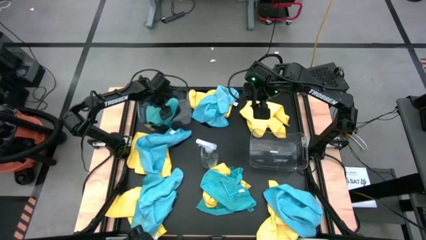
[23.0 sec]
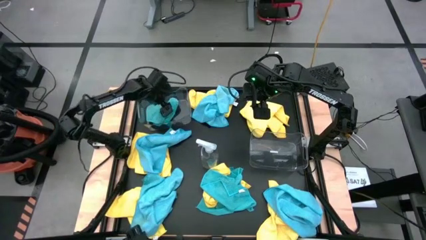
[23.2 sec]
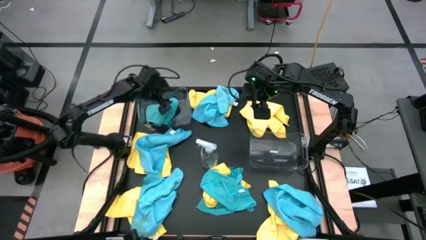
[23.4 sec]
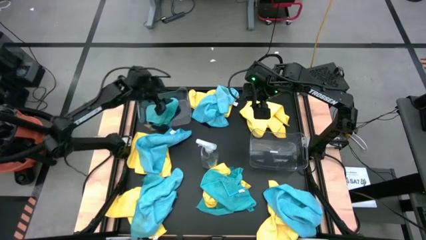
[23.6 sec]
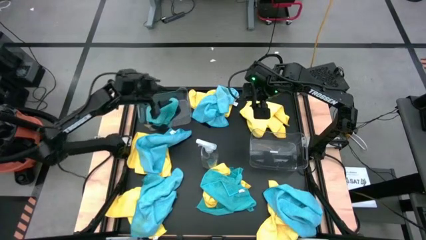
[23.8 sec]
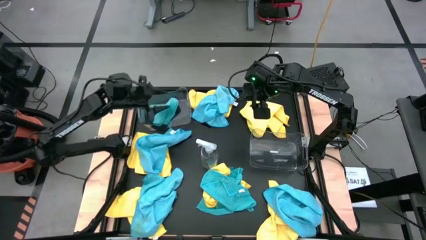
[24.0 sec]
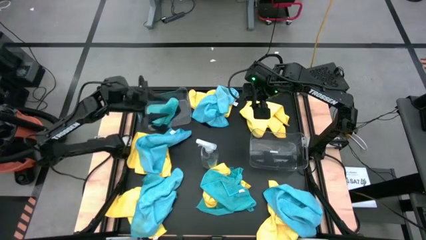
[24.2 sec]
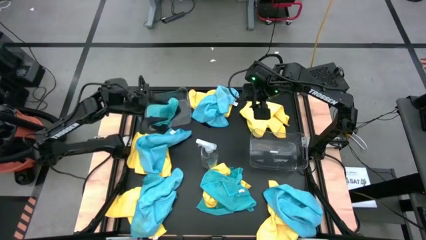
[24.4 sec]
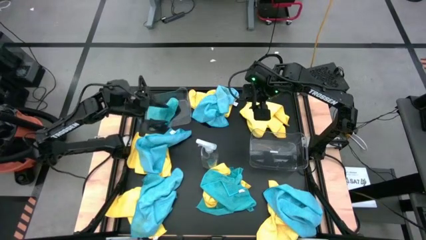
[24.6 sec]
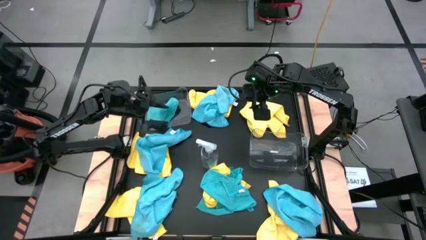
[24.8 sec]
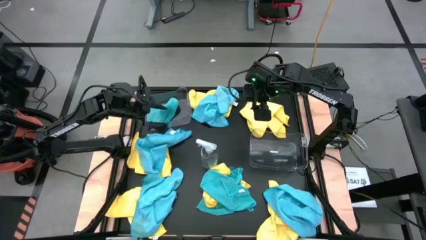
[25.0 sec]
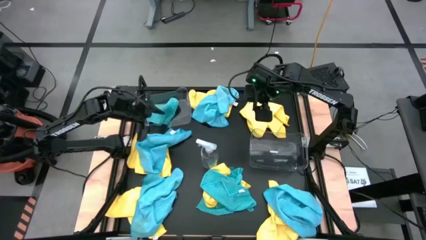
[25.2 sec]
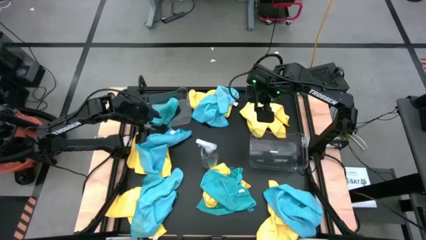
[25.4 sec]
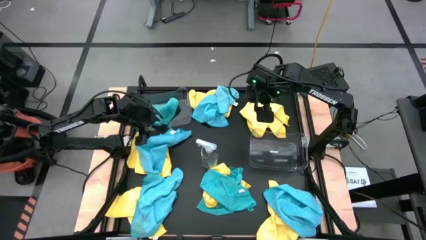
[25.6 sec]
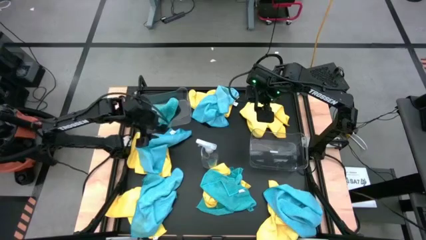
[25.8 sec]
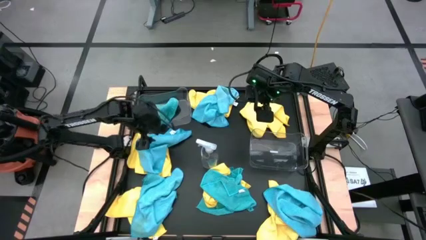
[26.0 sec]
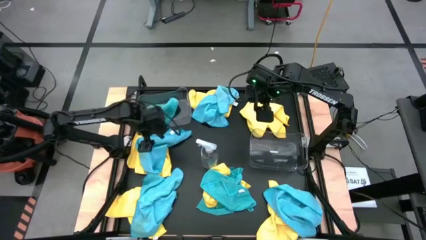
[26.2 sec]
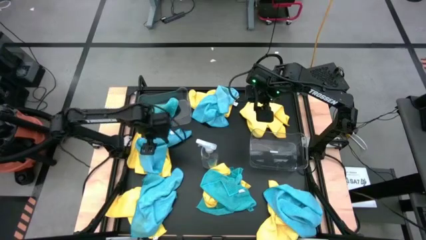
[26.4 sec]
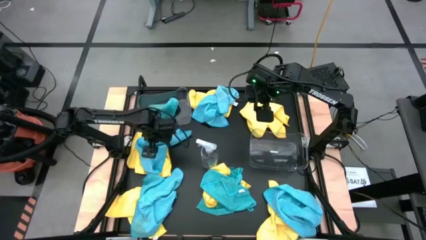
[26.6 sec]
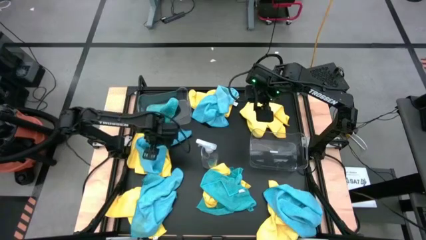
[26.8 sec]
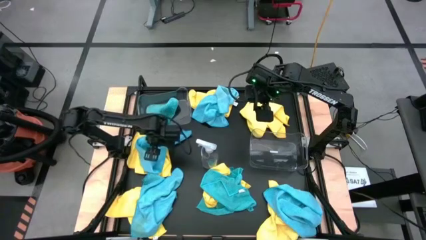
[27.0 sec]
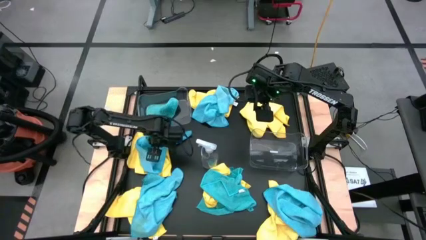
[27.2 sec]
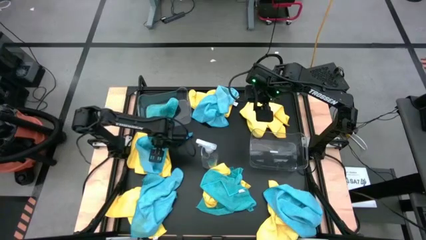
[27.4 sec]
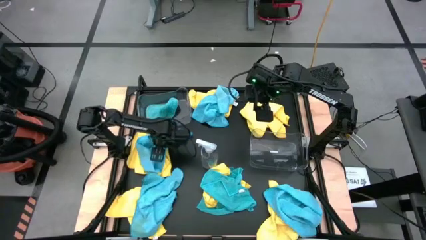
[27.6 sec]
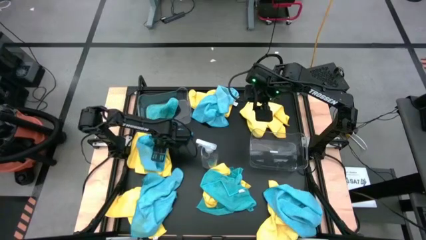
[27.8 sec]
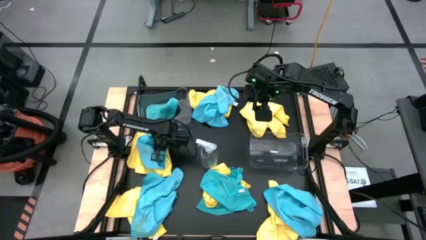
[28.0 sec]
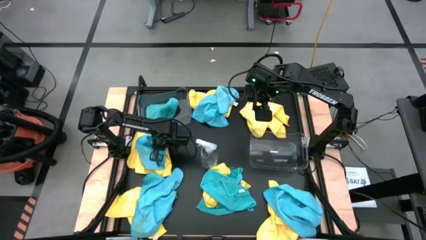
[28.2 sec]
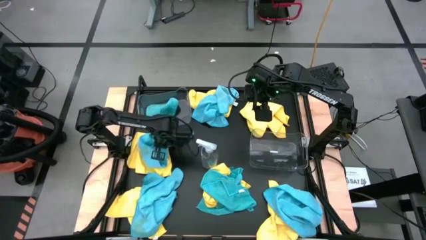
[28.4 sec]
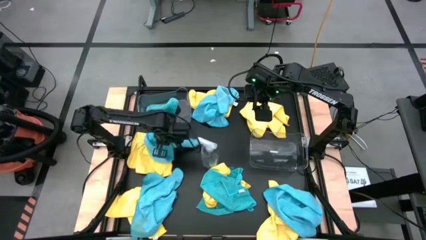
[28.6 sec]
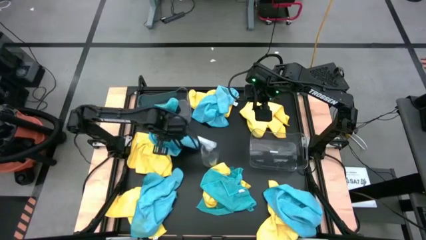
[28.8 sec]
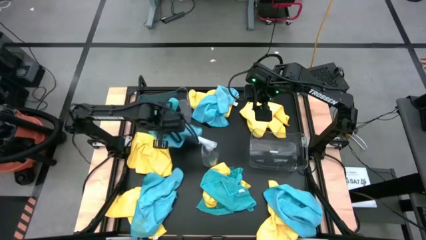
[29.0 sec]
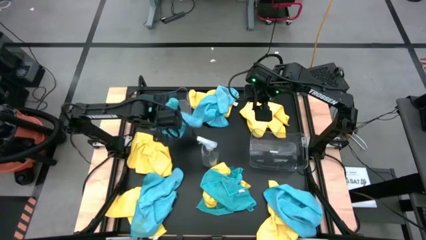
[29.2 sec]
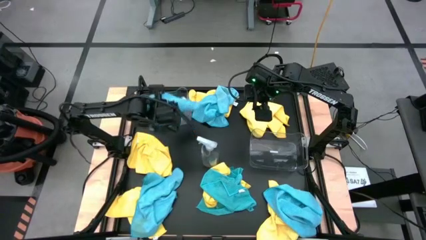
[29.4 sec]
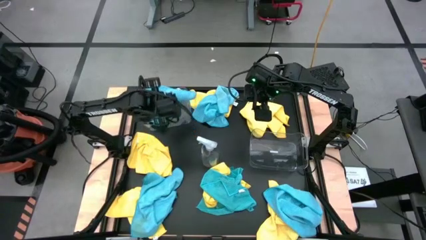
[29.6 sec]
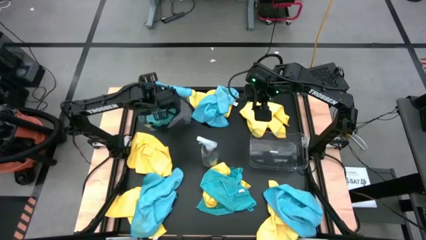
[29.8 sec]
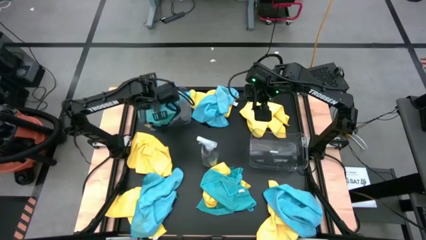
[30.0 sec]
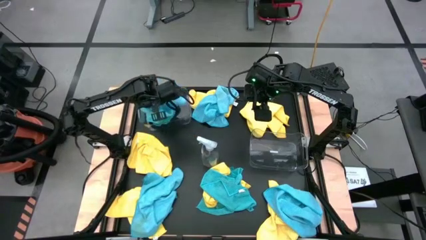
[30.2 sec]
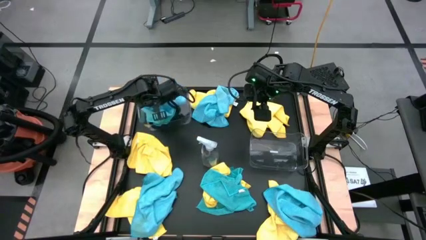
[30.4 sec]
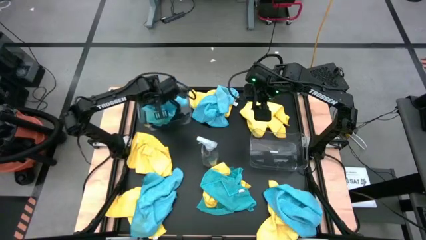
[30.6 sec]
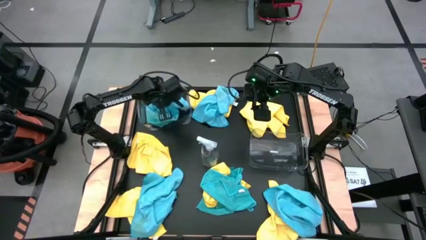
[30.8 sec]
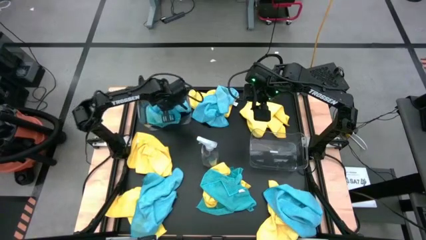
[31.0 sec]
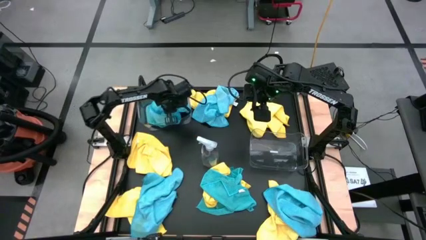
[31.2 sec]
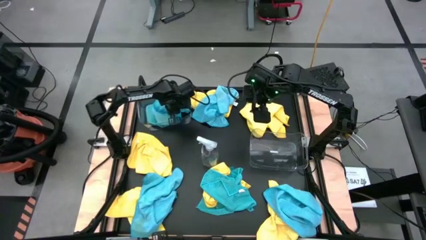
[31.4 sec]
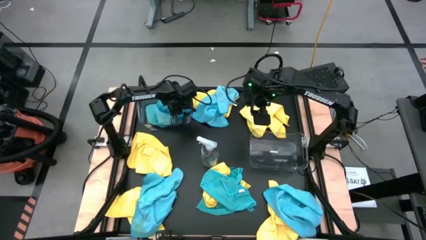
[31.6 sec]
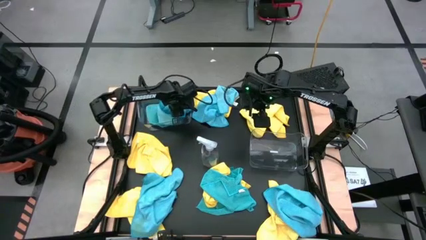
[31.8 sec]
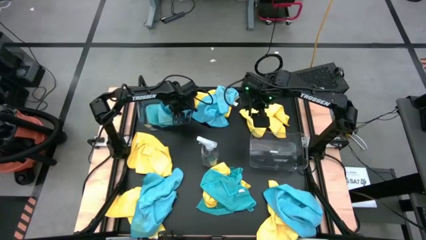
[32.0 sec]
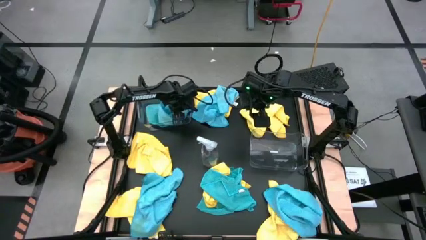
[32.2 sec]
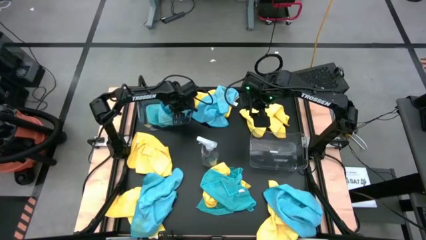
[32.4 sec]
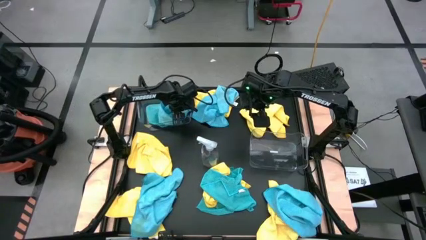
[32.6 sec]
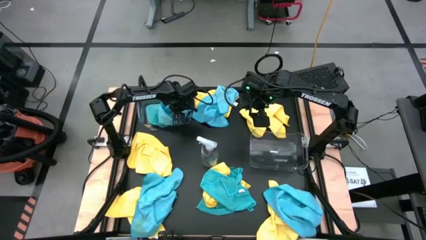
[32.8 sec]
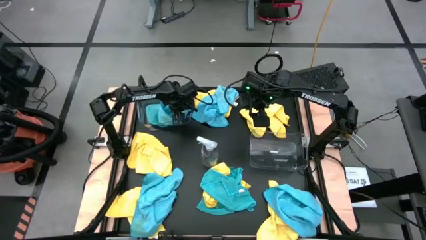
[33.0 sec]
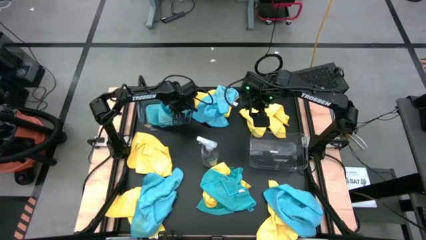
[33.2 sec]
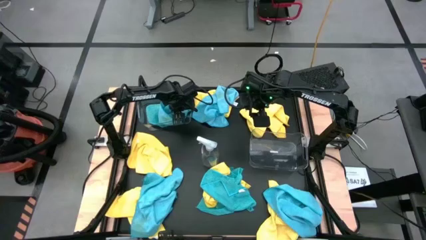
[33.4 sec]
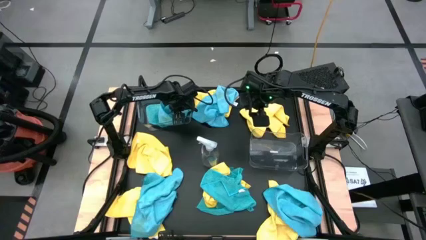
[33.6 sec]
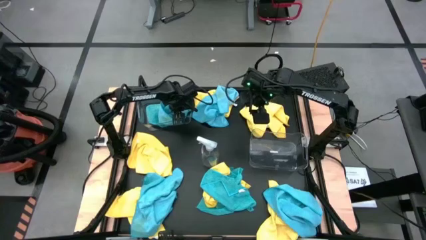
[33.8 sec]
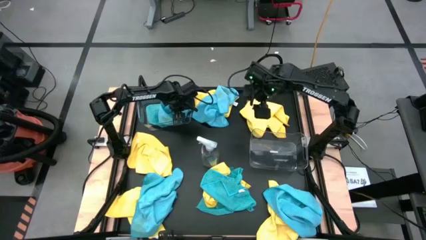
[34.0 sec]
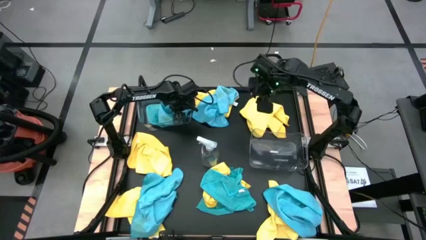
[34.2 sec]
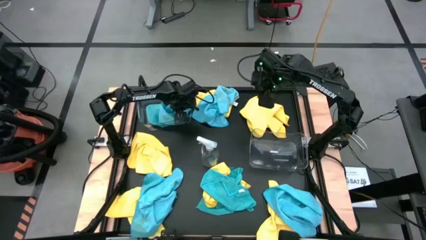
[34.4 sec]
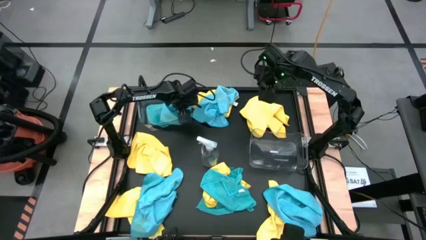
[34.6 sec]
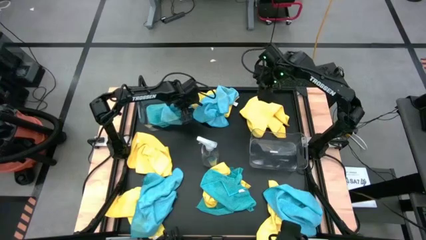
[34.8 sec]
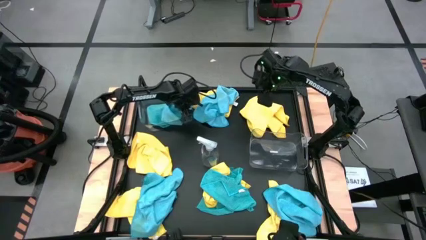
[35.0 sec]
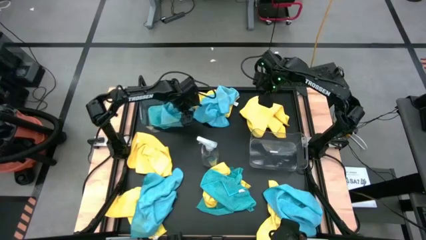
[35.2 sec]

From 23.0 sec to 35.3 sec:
Task: Sort microfiber towel by color & place in baskets
Put the blue microfiber towel into the top transparent bin

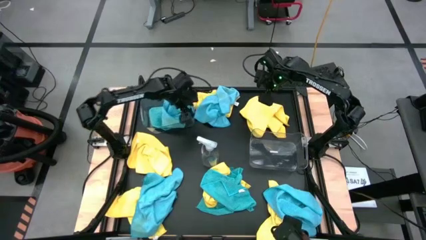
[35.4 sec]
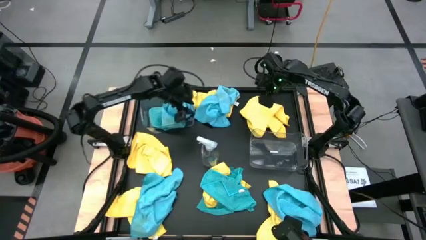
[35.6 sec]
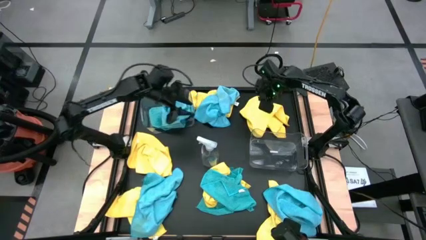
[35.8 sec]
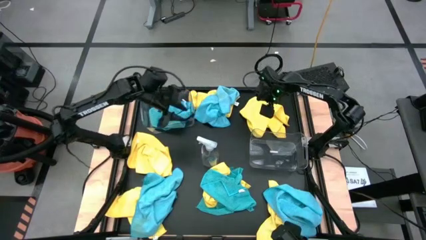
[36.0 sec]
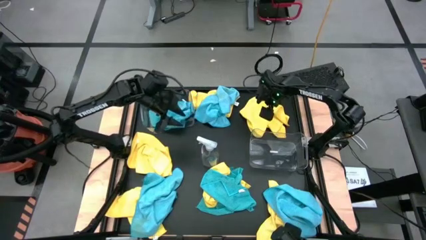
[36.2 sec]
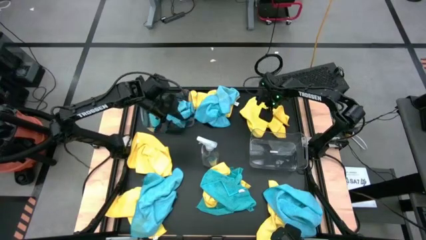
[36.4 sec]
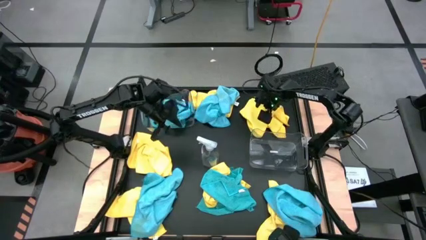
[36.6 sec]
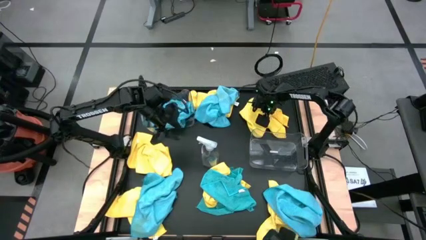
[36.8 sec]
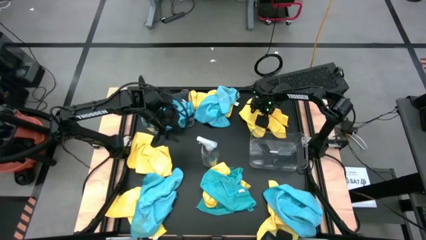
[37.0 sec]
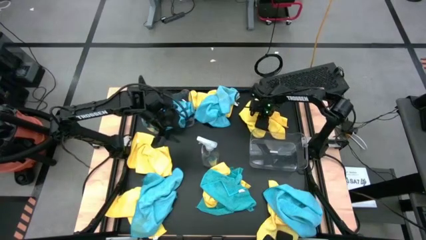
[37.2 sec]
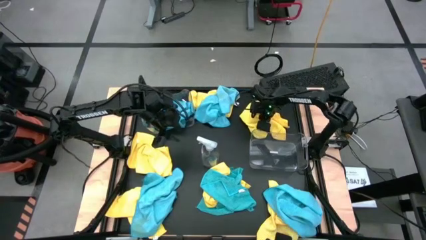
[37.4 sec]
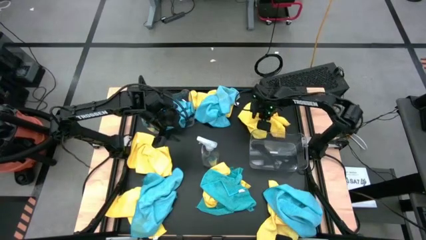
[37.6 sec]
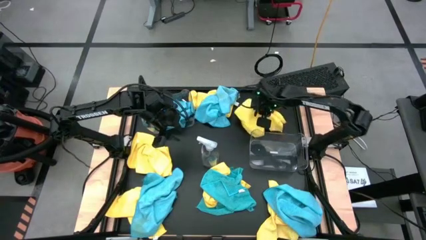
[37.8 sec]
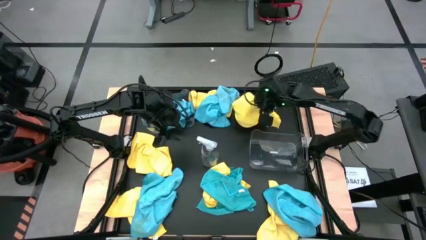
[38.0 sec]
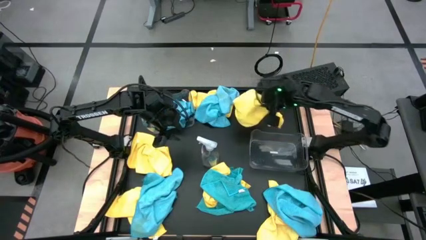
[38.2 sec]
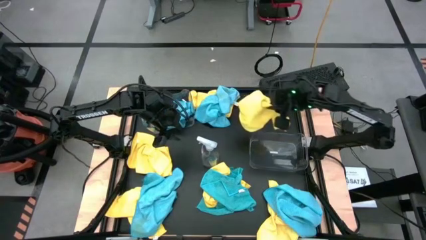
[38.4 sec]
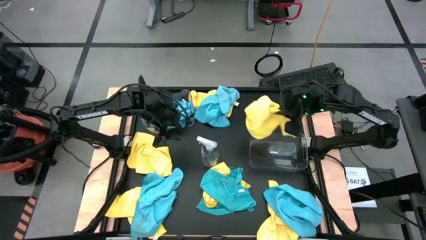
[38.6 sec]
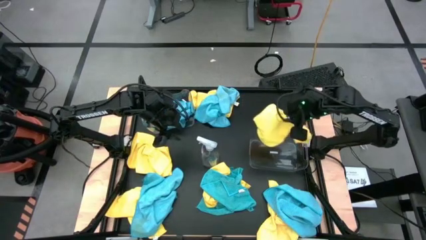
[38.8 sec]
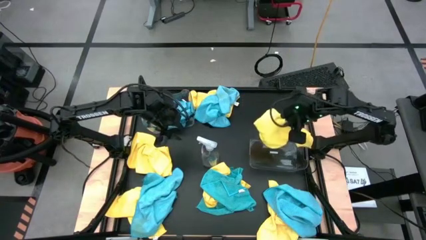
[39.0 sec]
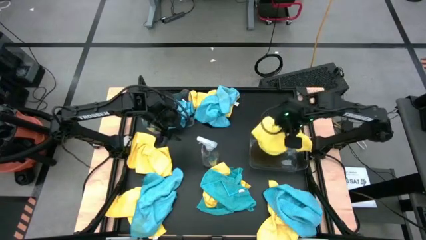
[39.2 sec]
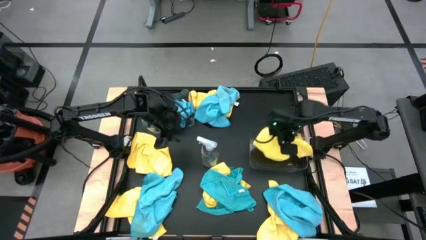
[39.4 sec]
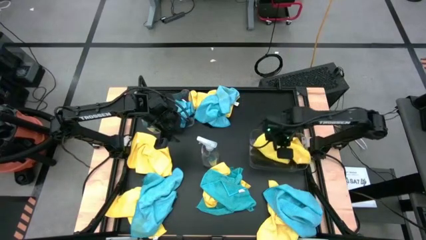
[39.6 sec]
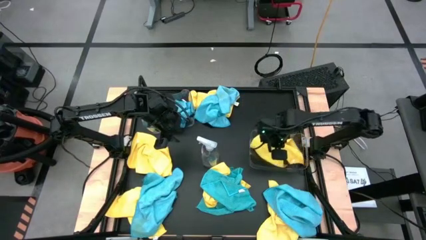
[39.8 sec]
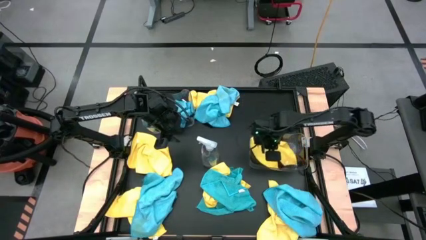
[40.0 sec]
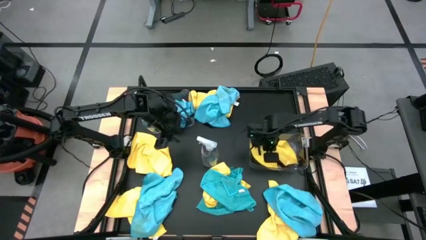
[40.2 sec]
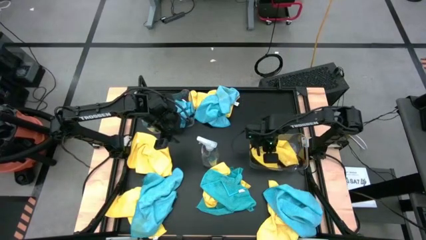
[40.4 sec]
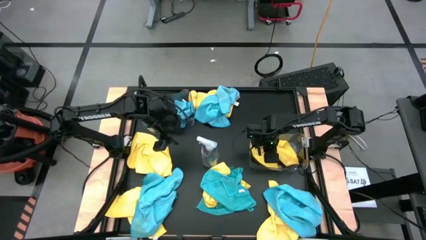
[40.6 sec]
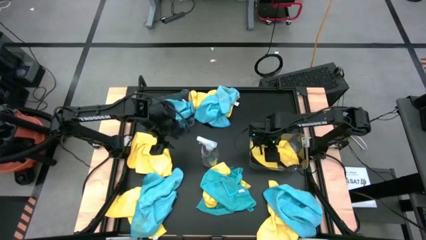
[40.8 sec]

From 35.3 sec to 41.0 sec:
Put the yellow microfiber towel into the bottom transparent bin
